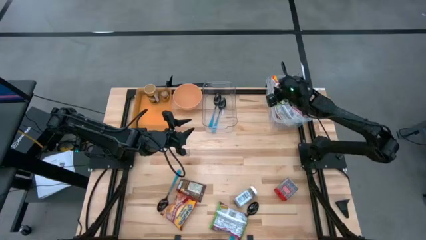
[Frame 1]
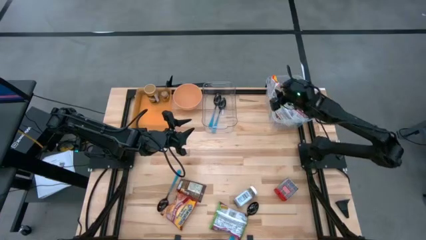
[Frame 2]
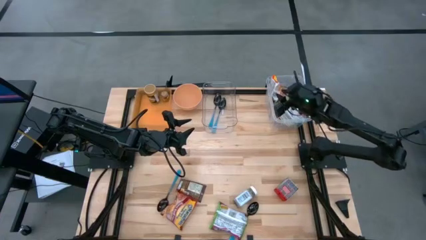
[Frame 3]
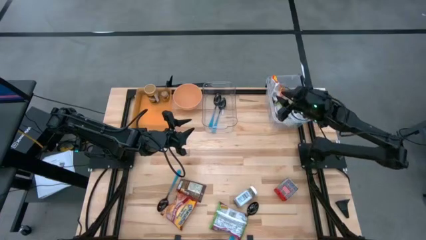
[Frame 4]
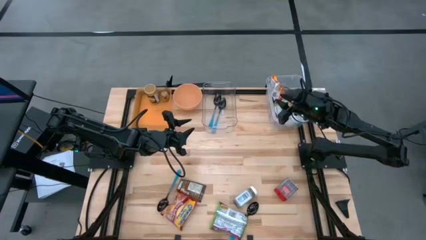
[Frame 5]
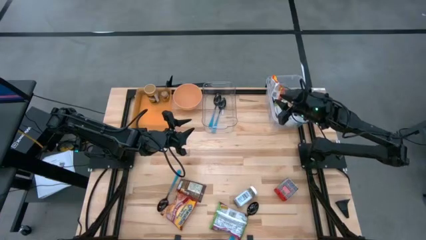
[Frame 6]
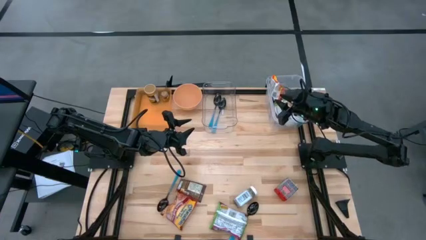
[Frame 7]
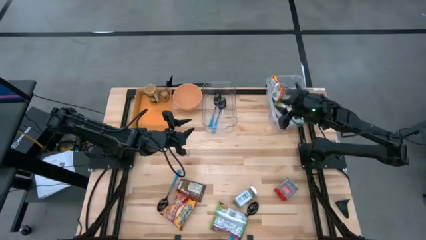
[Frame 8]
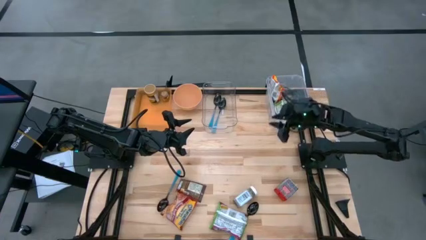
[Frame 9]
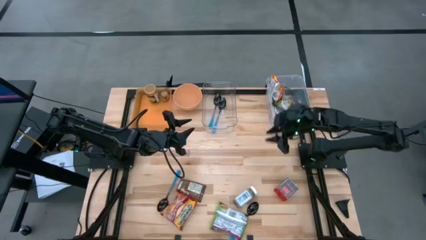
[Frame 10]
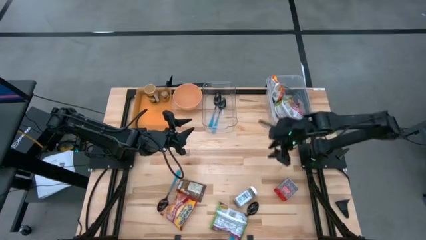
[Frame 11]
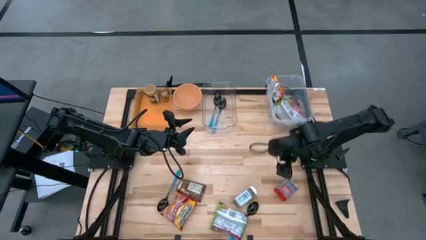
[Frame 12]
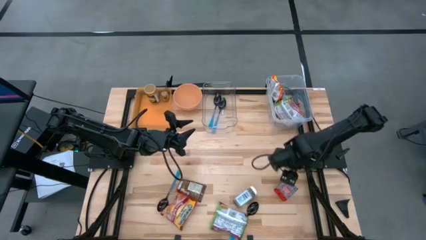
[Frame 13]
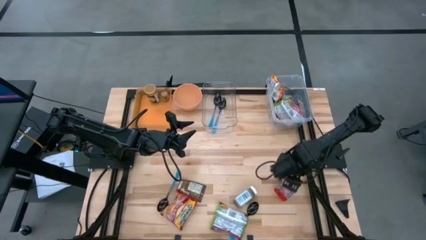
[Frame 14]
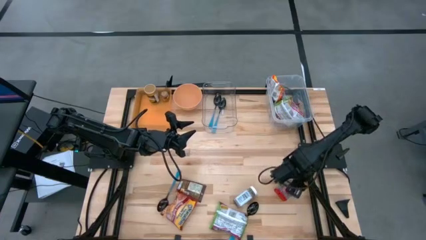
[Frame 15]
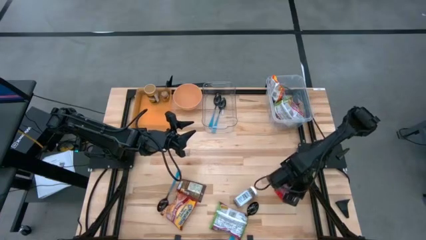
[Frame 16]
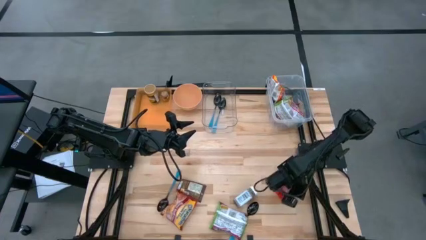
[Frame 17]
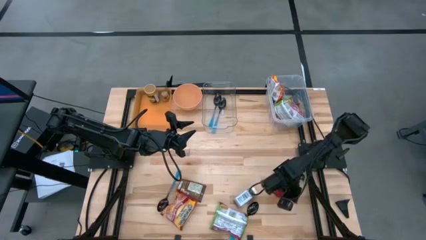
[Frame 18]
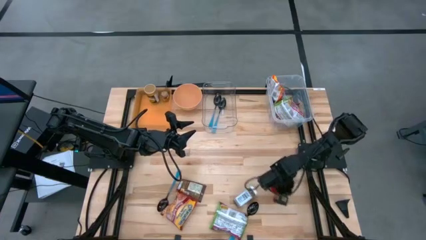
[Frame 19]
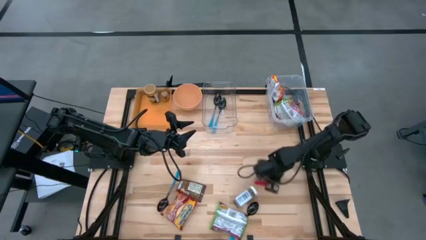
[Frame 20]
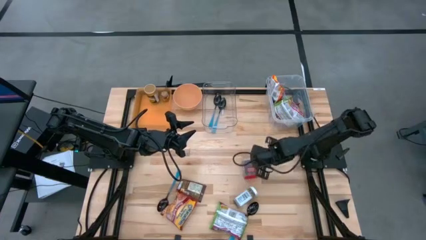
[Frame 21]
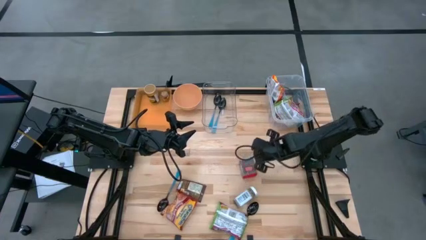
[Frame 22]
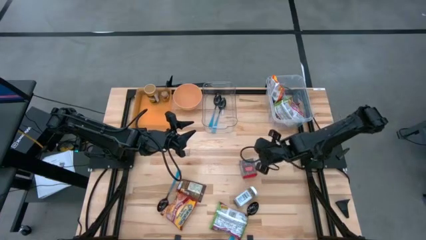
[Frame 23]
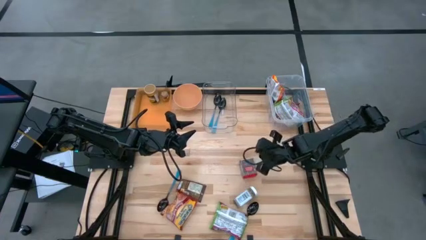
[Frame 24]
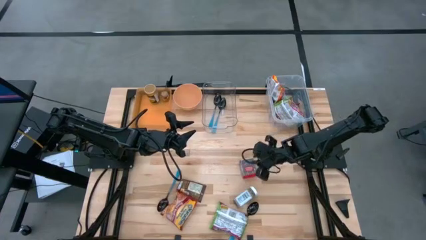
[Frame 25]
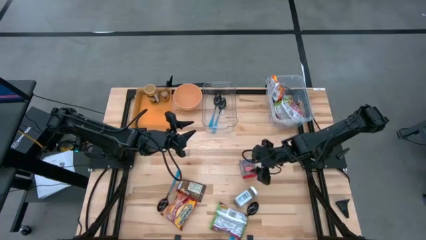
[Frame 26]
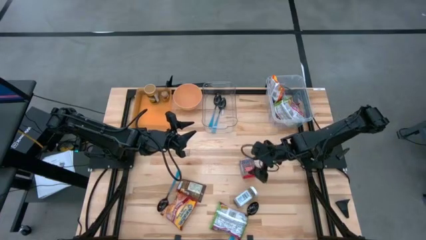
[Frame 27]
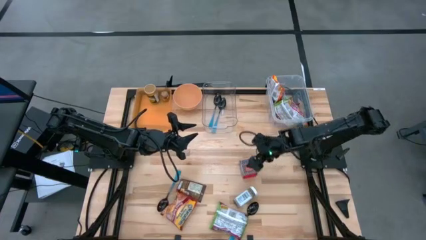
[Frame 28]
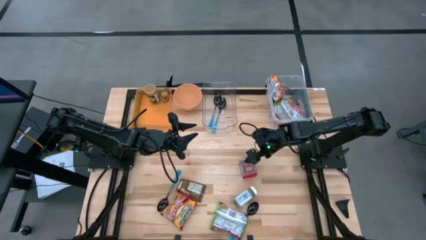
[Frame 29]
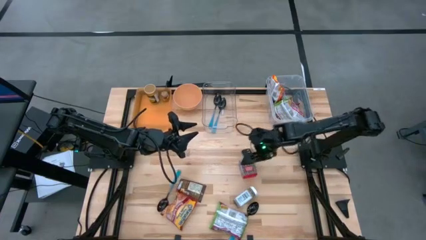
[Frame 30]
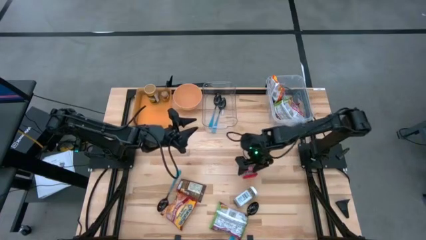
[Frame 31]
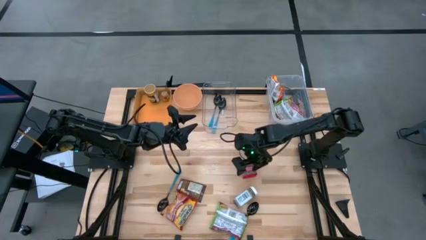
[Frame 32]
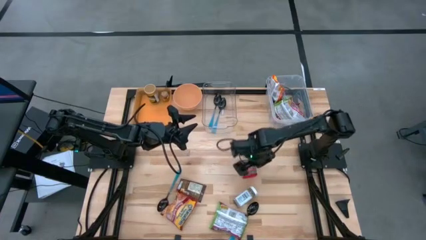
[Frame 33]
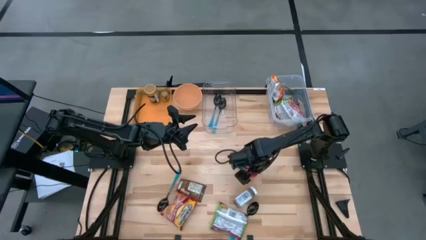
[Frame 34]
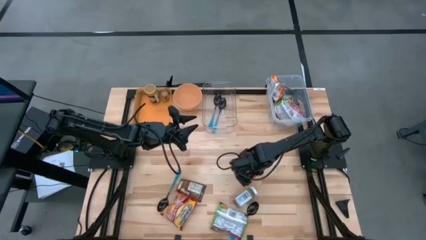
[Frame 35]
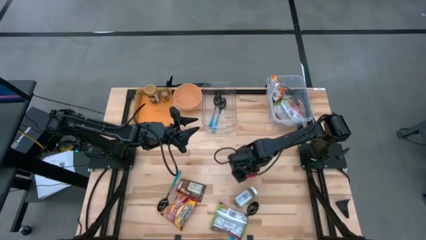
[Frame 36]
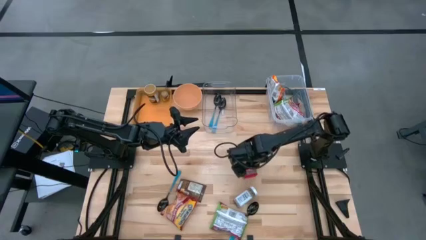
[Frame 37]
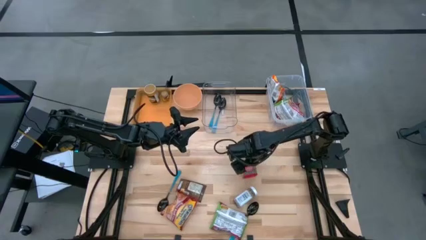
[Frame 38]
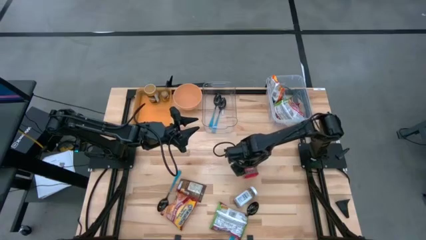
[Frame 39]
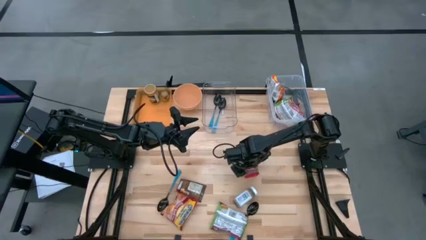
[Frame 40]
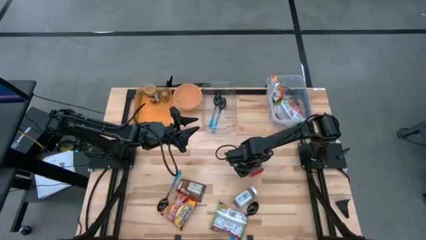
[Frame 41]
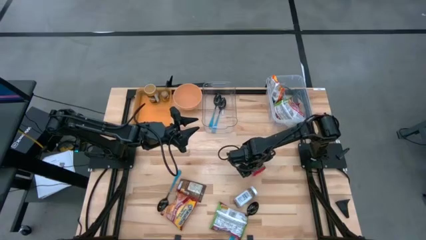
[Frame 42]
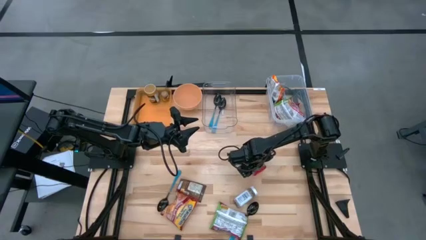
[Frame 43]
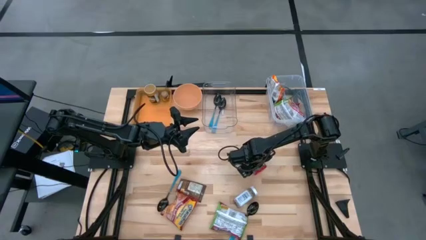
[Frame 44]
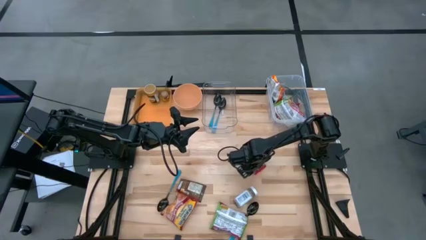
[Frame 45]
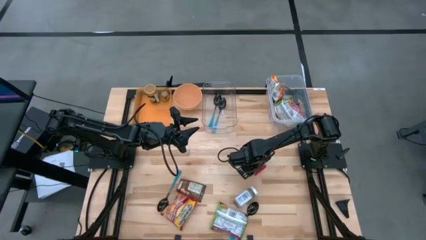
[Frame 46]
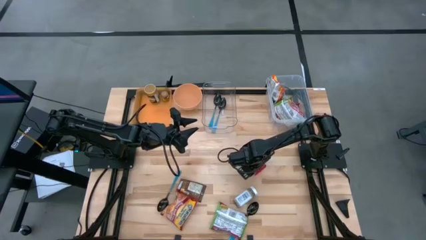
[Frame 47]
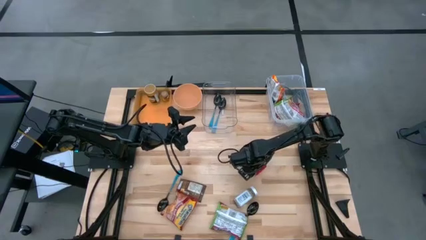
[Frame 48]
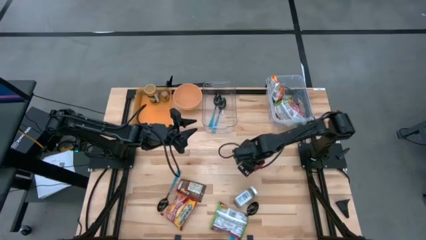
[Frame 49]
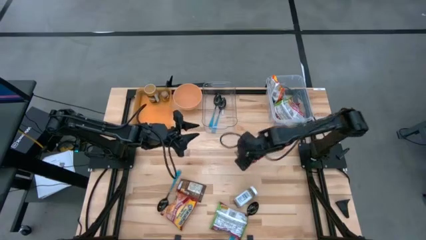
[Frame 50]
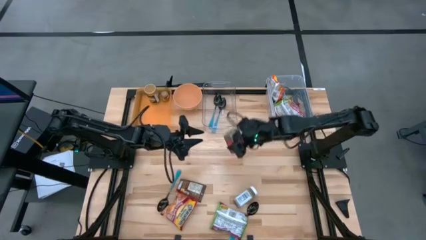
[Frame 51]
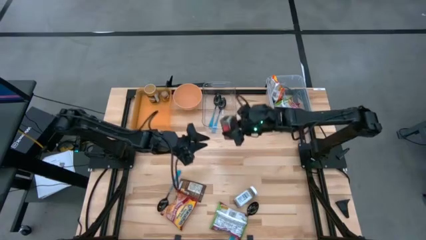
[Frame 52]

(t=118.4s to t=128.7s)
Task: Pick & Place Food Item
Put the red seasoning can into the orange bin
